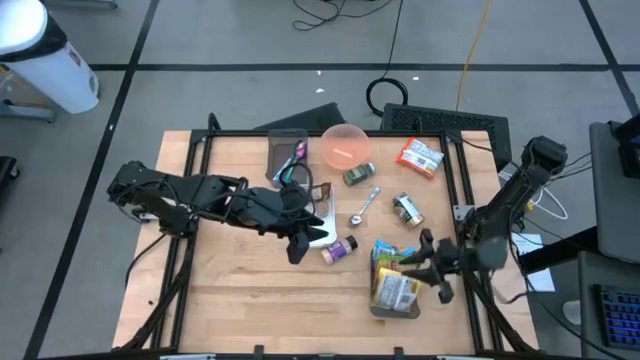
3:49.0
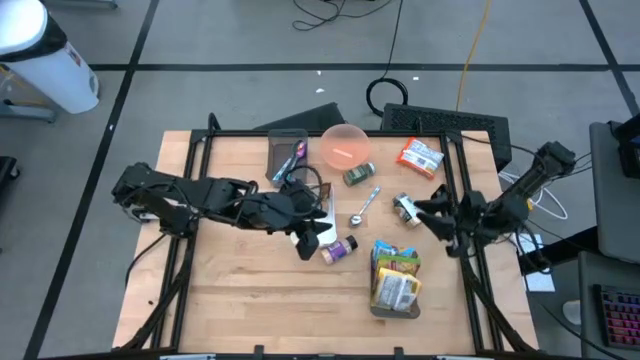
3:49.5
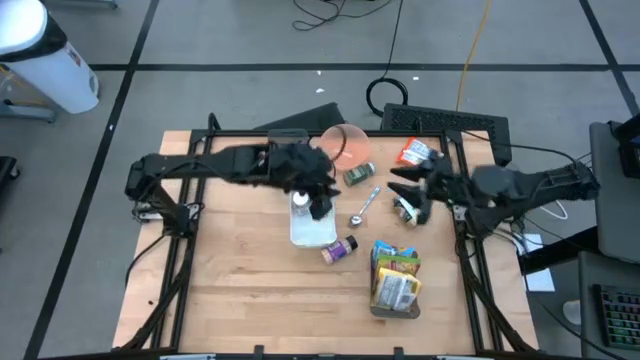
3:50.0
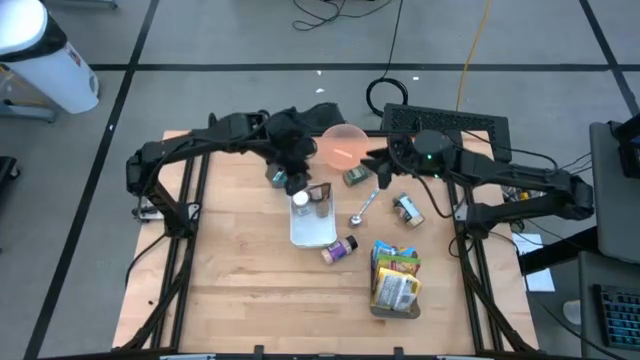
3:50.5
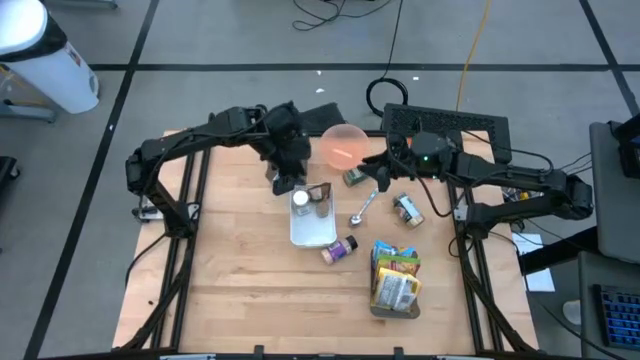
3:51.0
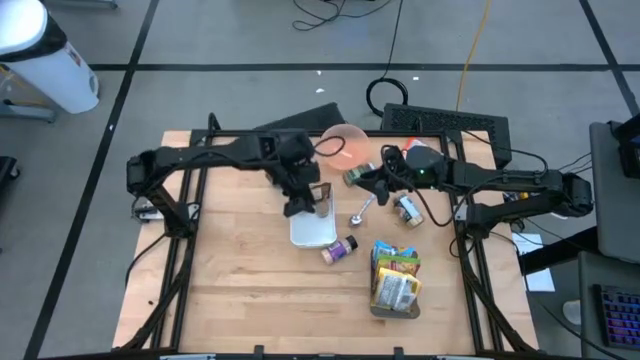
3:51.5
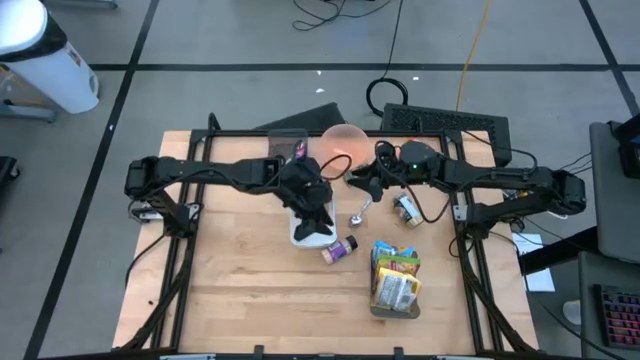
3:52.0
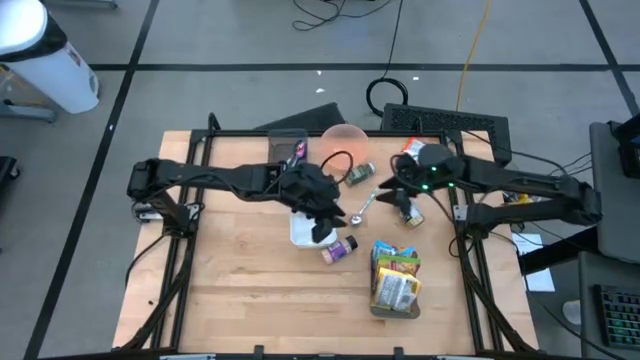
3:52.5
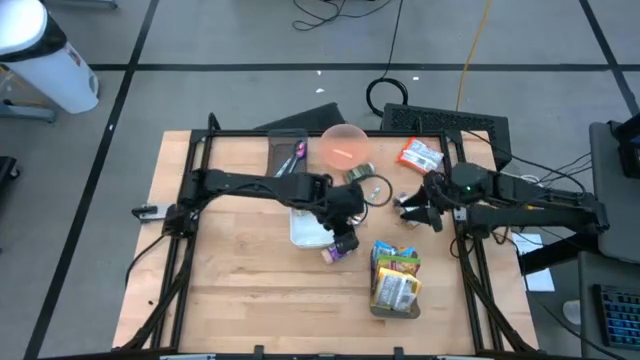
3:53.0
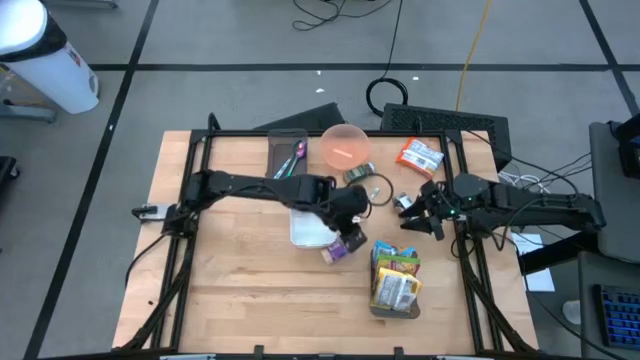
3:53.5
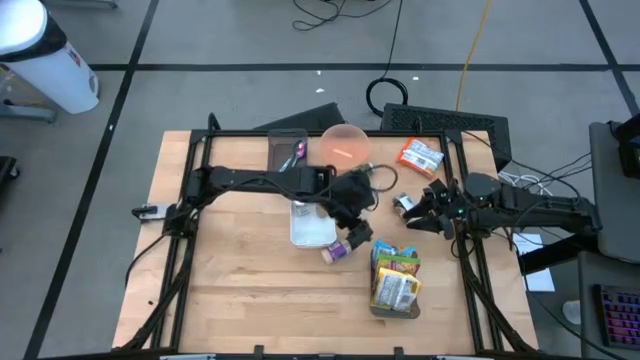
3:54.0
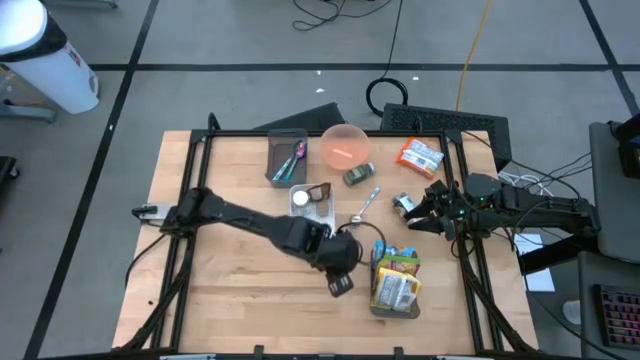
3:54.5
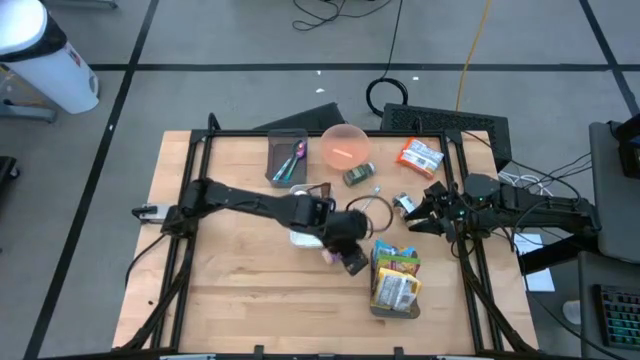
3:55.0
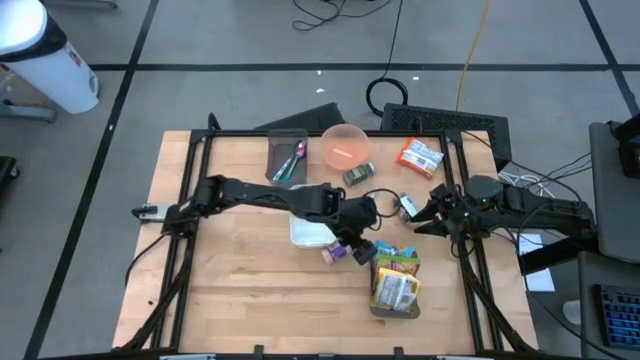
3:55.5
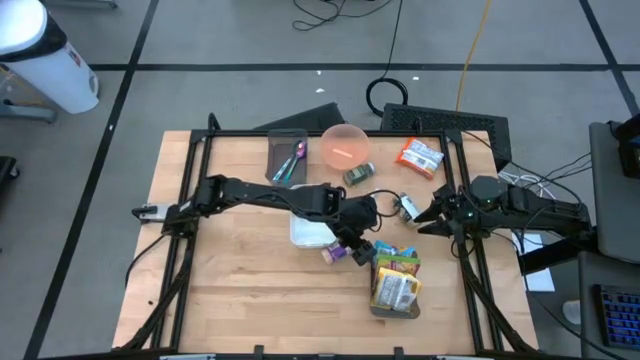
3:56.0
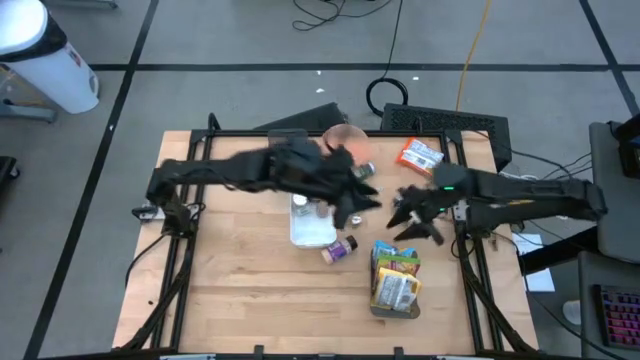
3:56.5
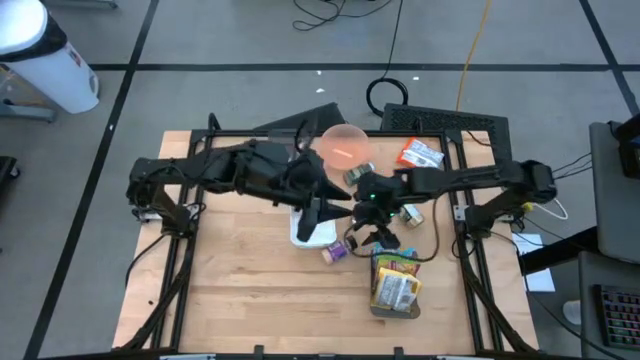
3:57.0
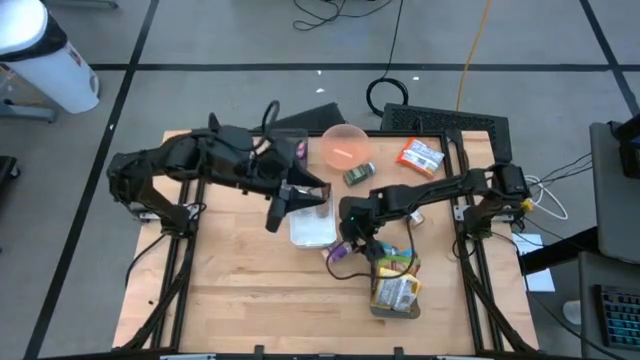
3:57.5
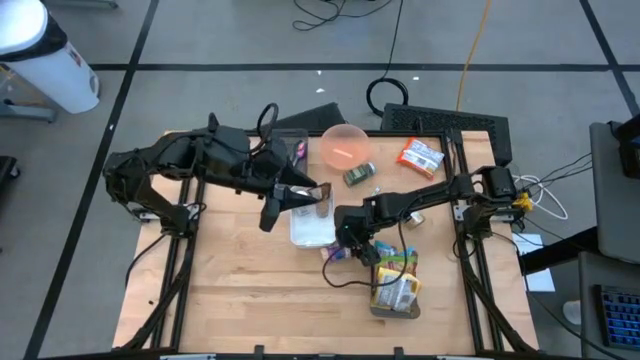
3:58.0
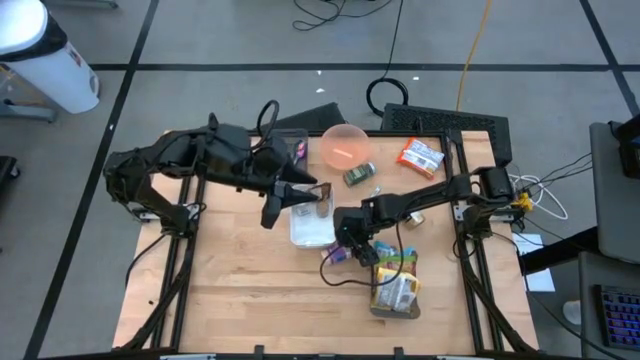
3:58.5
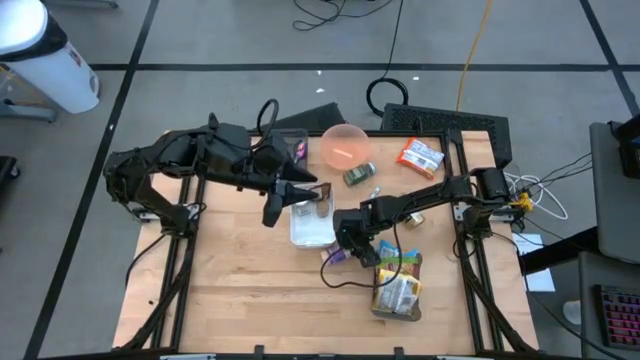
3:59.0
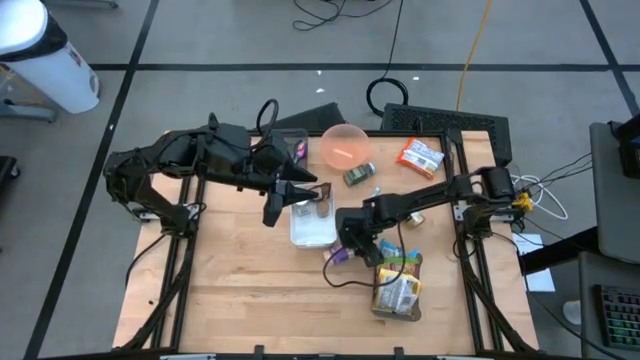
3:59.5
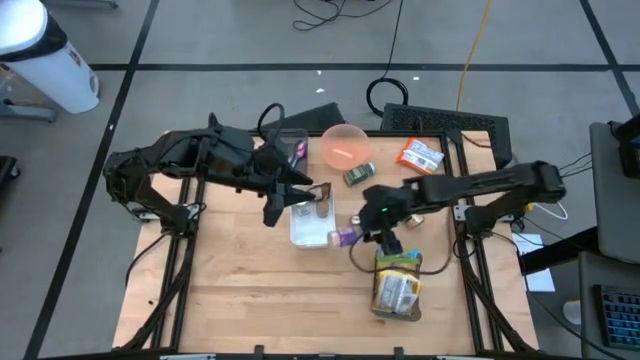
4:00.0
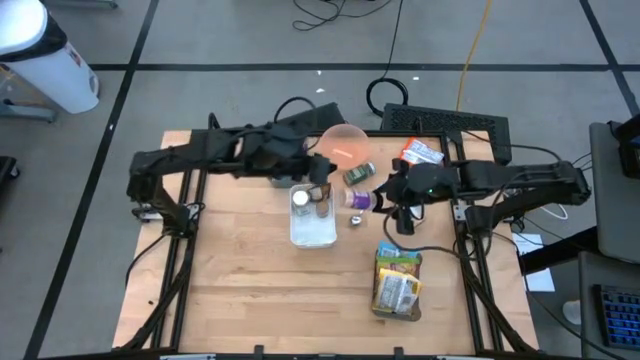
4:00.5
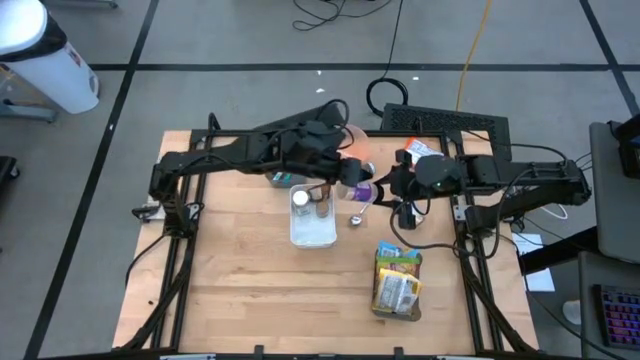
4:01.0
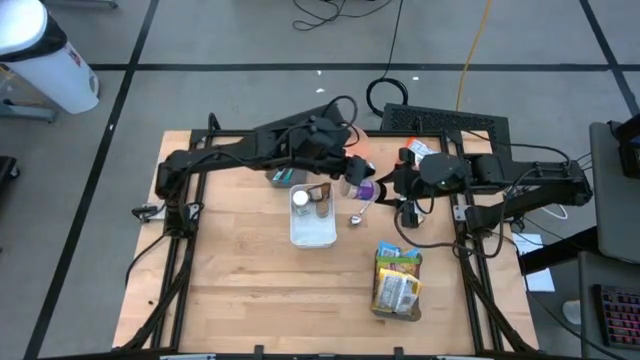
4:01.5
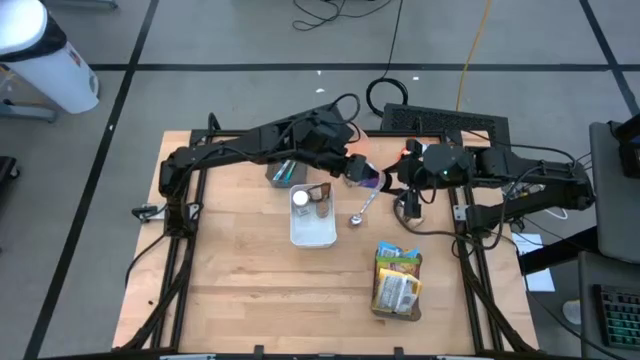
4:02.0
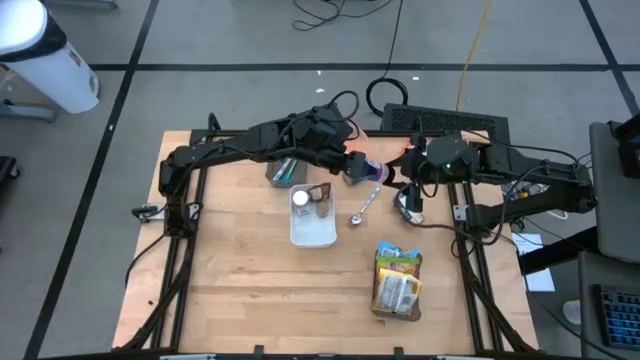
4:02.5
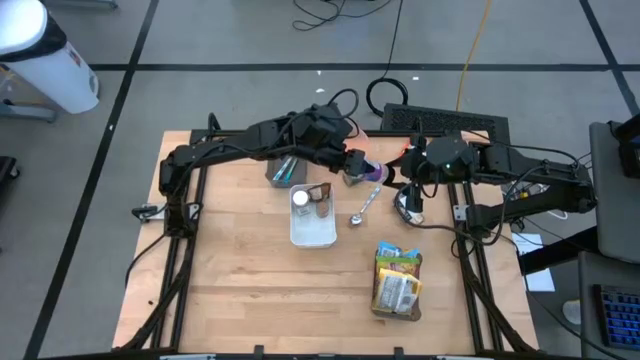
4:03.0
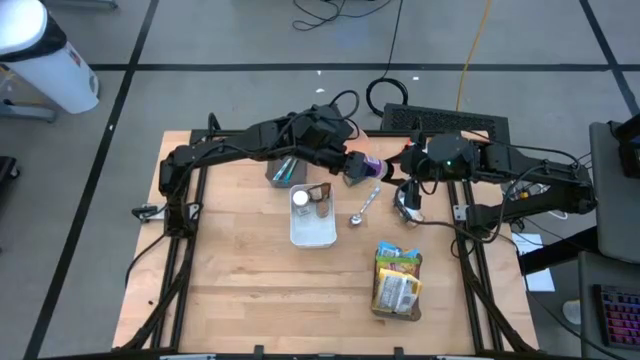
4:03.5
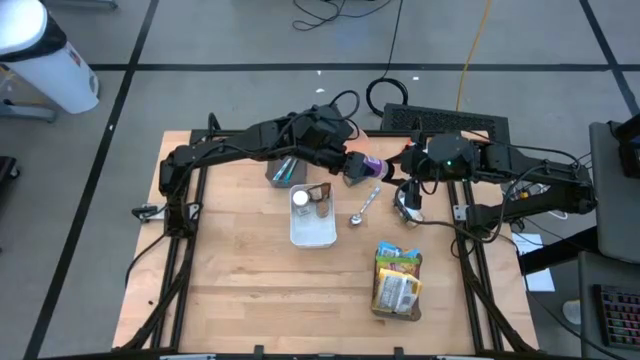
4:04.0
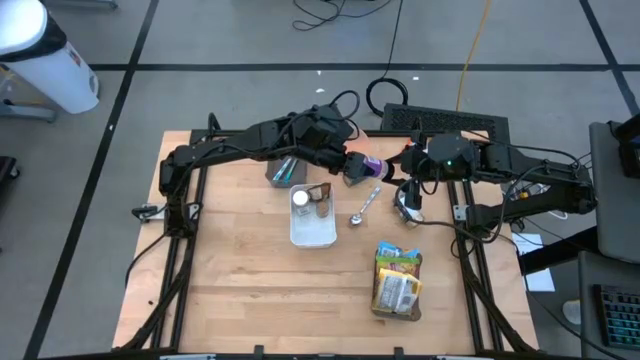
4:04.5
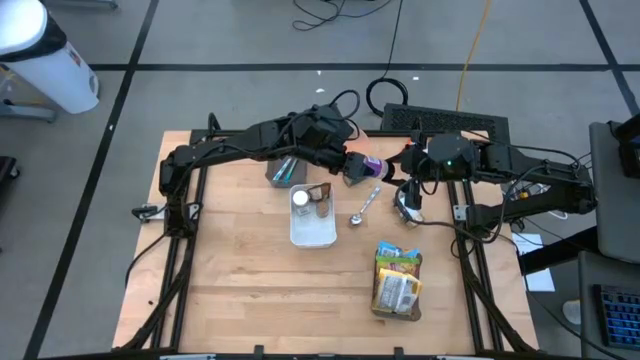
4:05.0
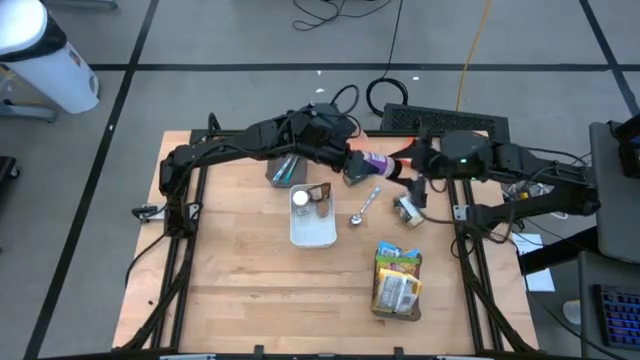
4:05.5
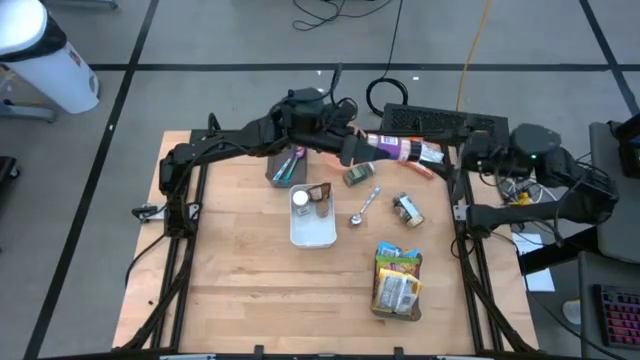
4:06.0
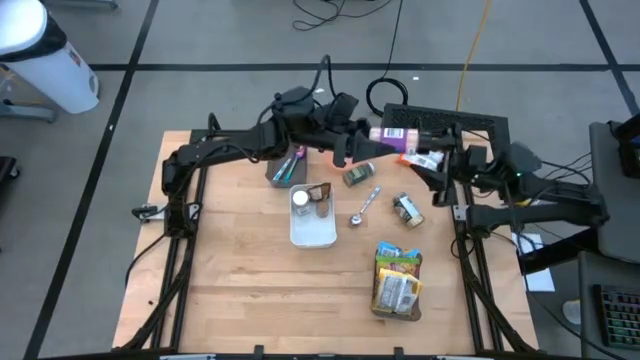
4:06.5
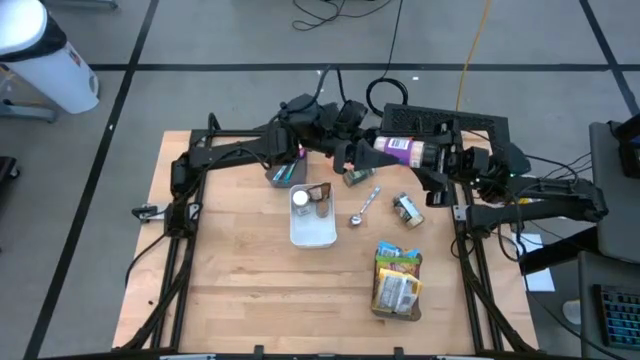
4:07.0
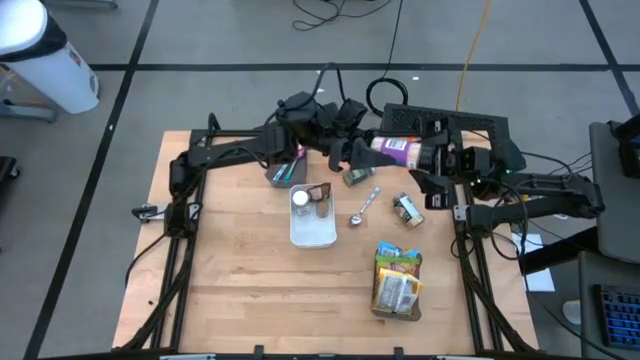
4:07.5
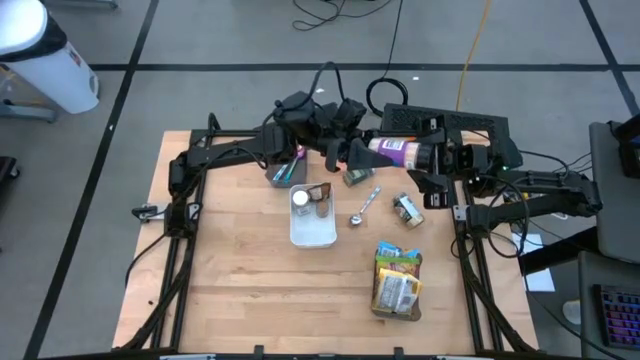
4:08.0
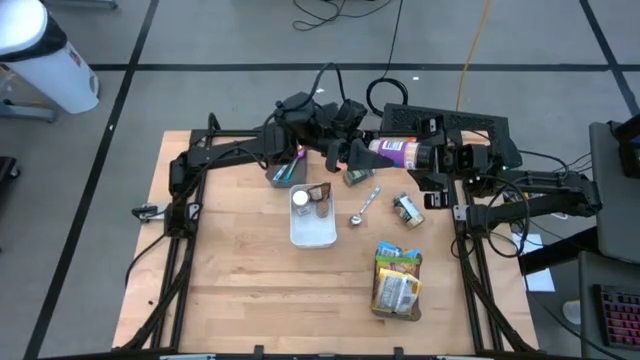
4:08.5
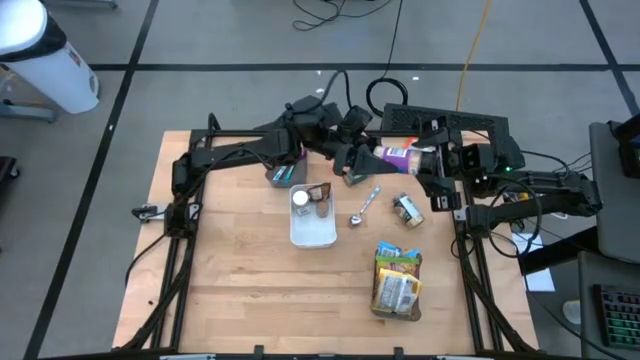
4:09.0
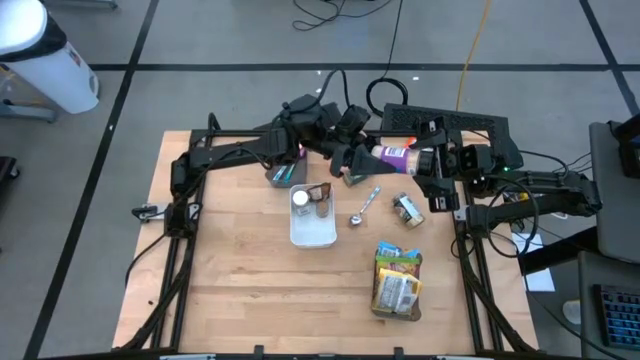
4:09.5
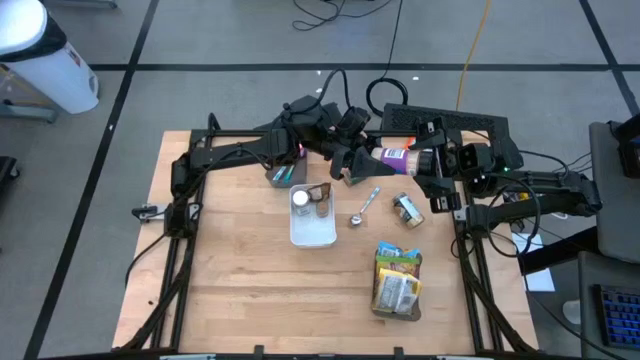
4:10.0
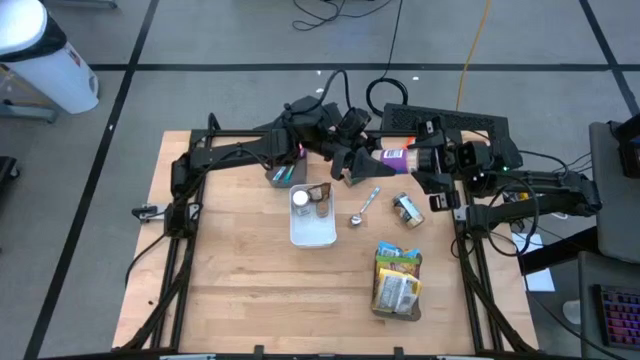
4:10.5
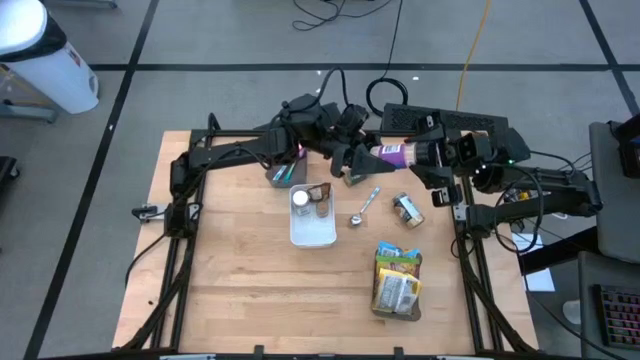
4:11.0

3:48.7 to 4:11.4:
Task: Pick & Place Food Item
Put the purple seasoning bottle into the white bin
